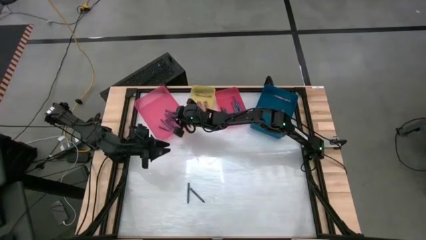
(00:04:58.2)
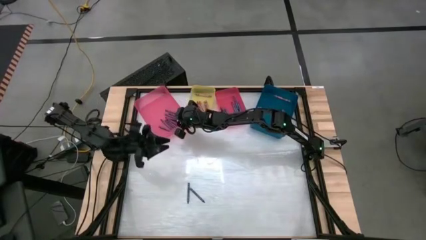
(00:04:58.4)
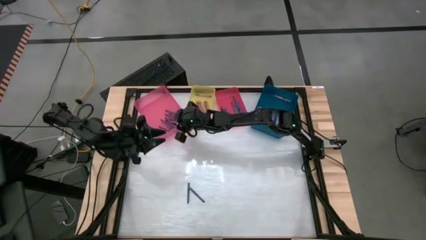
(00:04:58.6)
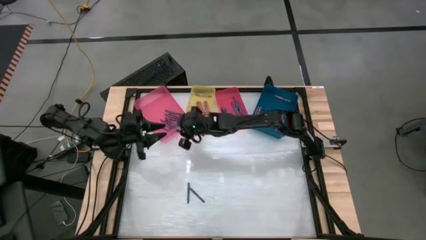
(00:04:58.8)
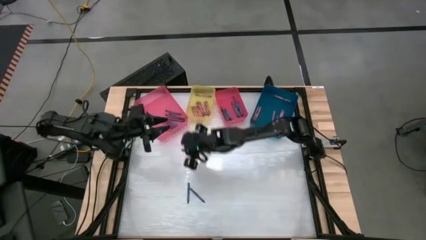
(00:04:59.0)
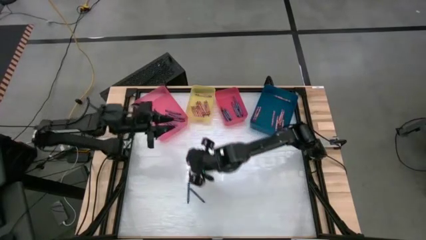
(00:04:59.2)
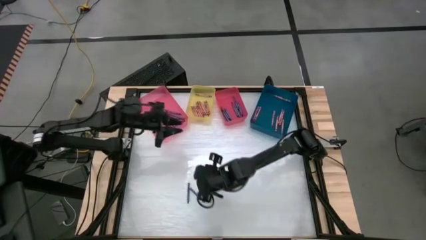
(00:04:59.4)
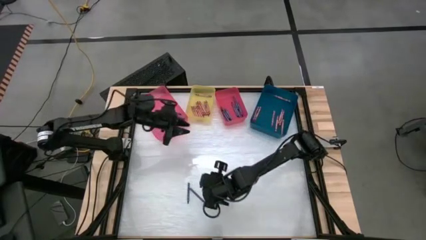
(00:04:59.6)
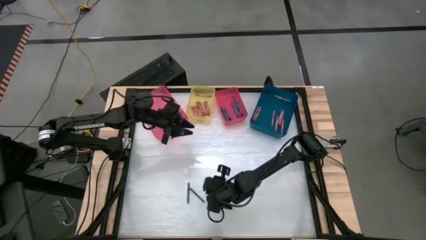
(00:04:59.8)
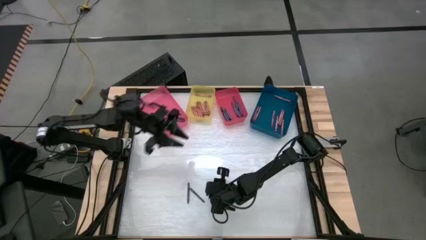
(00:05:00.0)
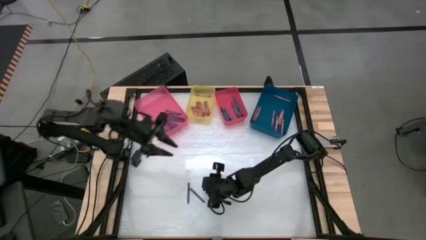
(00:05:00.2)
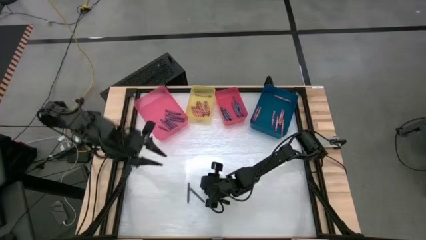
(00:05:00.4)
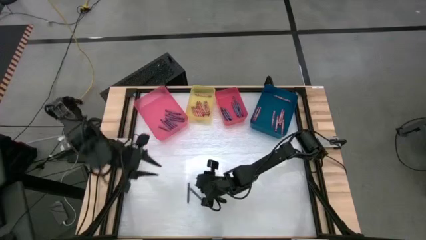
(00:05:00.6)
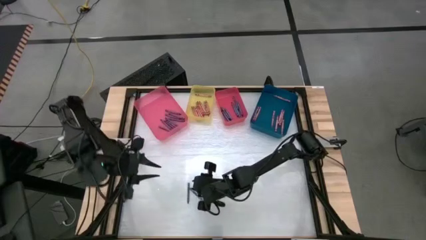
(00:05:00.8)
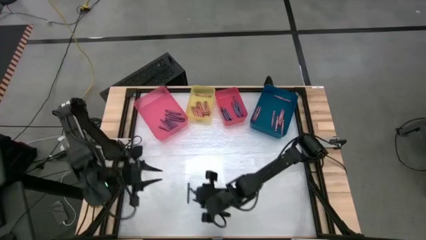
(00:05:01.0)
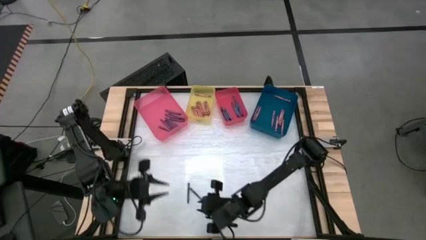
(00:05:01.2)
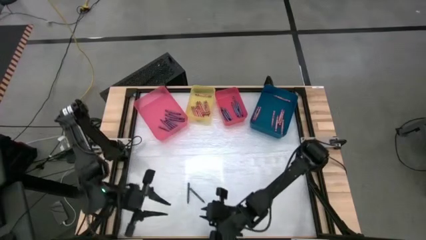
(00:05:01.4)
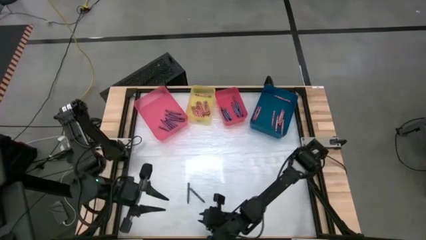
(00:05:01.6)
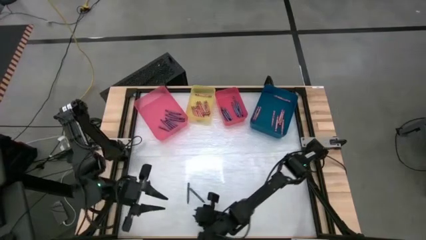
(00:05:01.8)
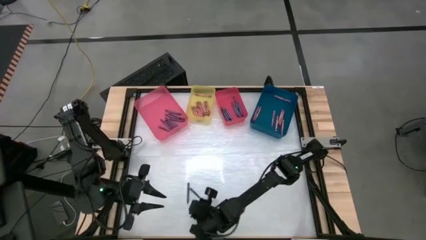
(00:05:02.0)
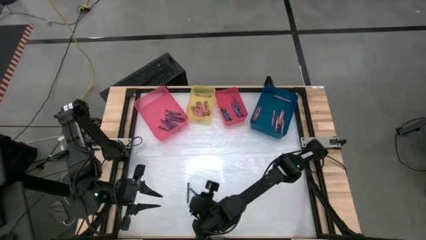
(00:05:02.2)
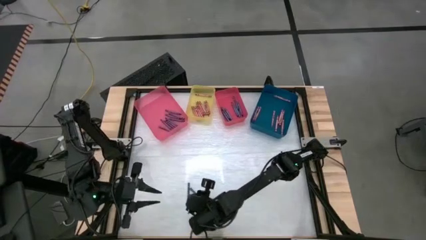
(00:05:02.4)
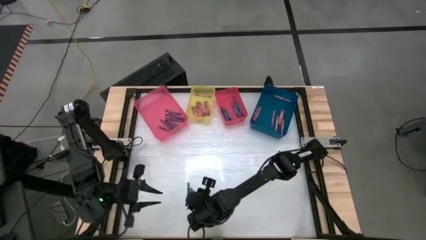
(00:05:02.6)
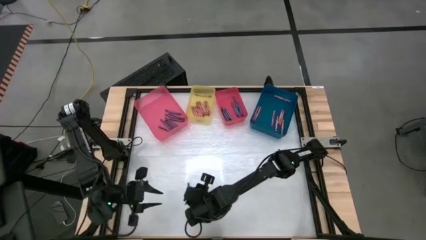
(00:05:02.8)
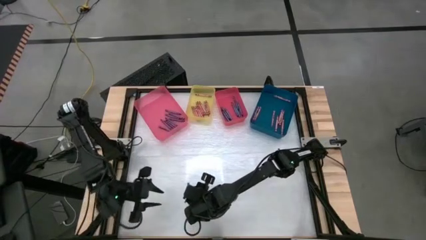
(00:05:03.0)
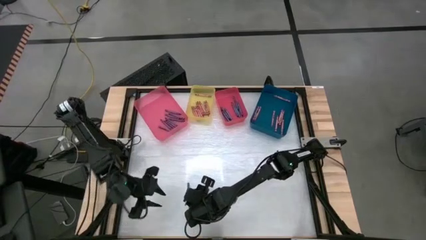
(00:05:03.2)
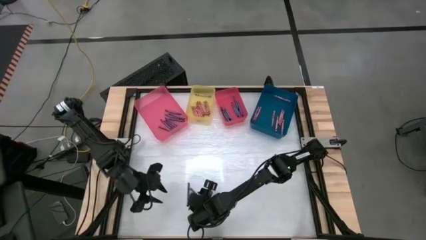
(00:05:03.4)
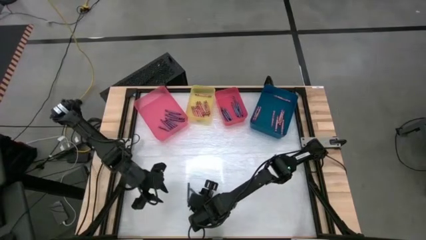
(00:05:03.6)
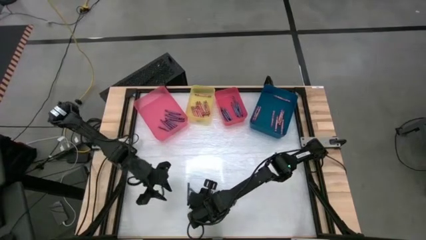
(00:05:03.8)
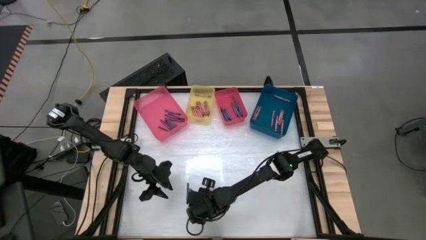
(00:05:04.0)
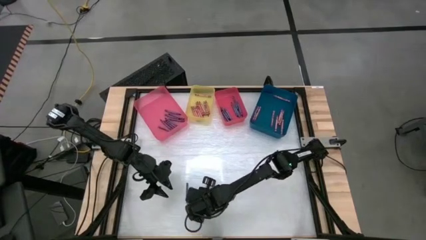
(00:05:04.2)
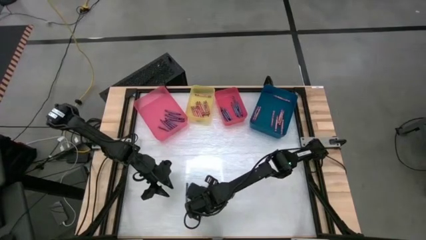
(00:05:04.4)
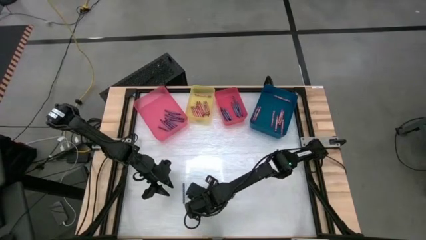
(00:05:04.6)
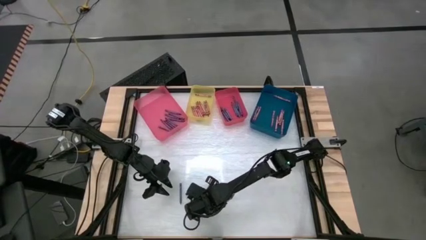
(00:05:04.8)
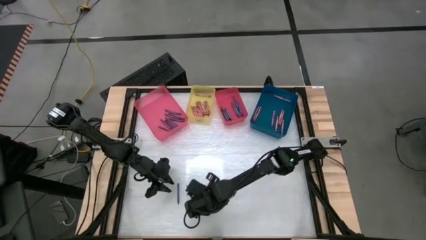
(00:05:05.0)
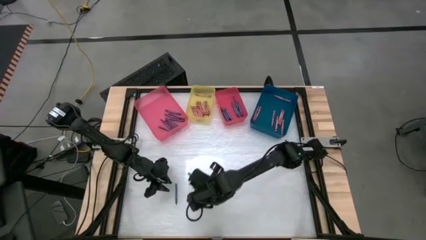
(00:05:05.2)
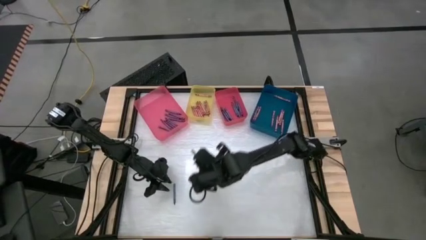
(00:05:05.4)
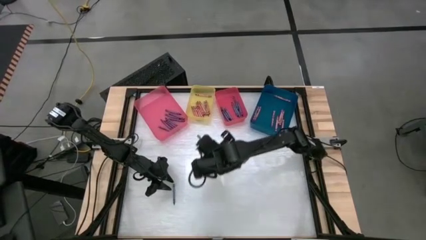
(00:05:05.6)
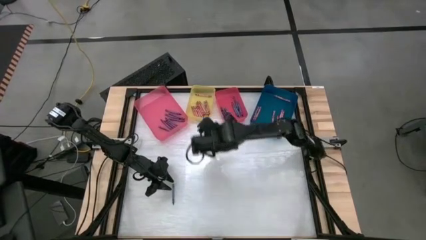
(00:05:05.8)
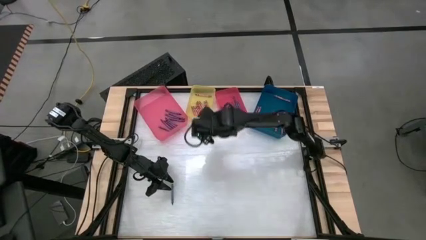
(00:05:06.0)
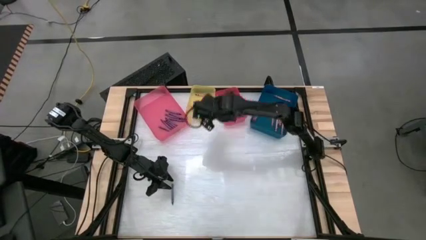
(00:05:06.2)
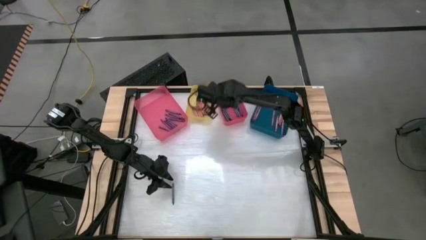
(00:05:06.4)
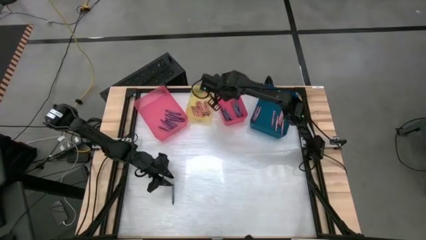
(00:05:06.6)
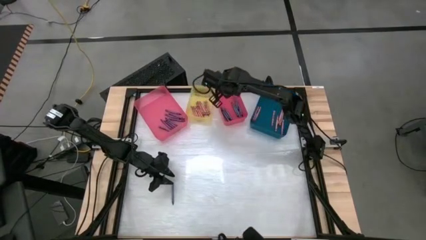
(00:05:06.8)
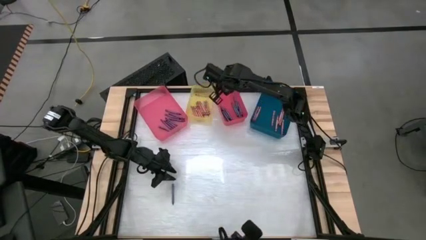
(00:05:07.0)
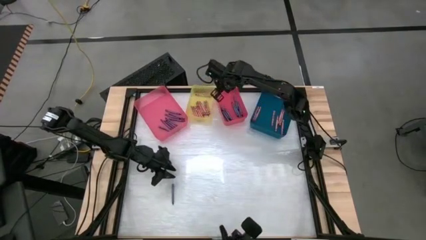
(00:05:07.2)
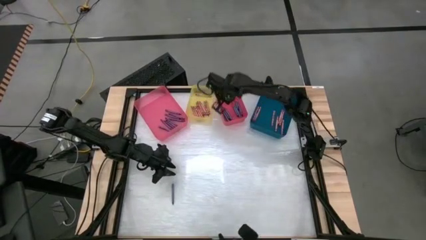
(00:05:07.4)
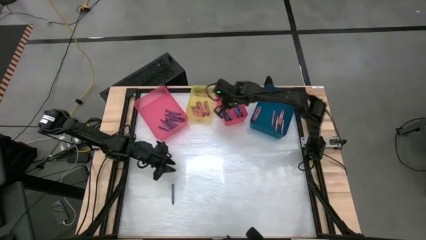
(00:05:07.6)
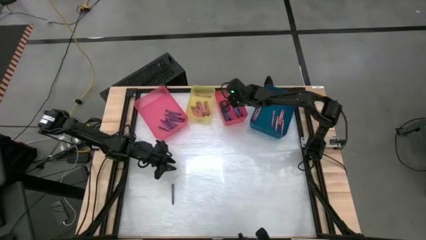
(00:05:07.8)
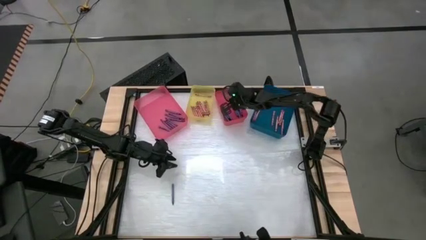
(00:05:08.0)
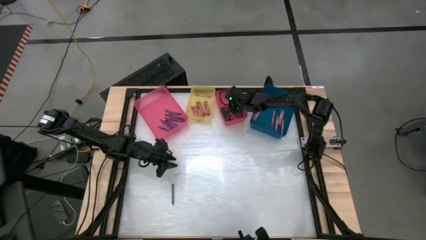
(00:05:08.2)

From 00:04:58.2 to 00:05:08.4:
Task: Sort crayons
Put the blue crayon into the red bin

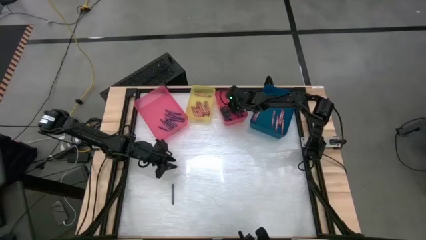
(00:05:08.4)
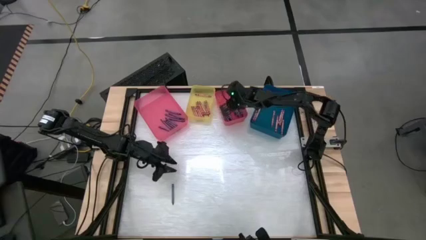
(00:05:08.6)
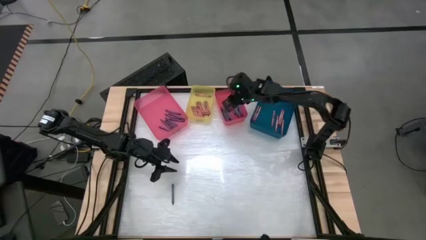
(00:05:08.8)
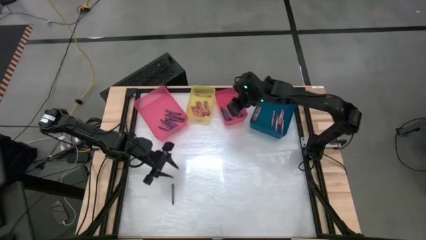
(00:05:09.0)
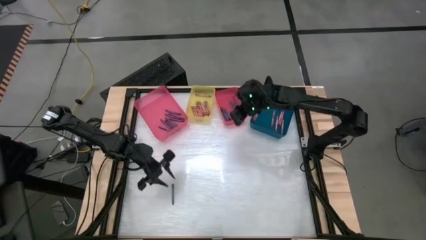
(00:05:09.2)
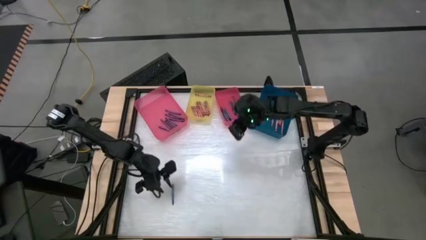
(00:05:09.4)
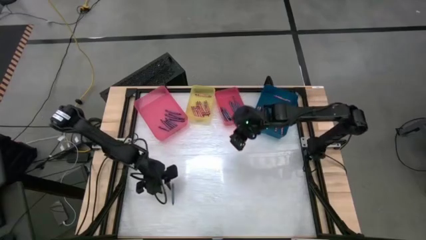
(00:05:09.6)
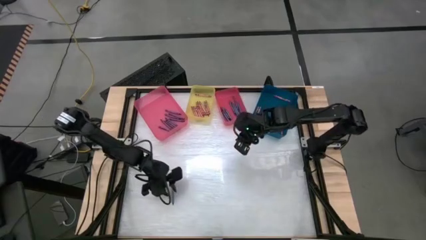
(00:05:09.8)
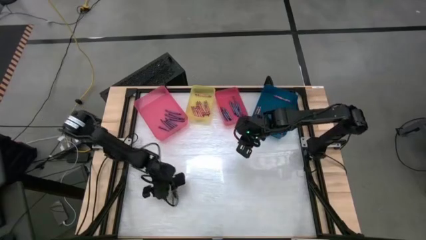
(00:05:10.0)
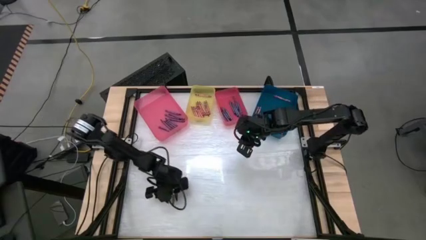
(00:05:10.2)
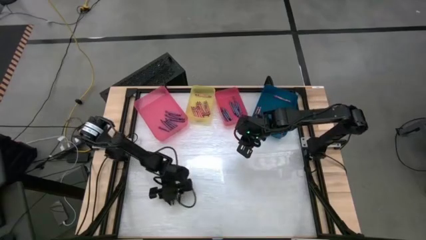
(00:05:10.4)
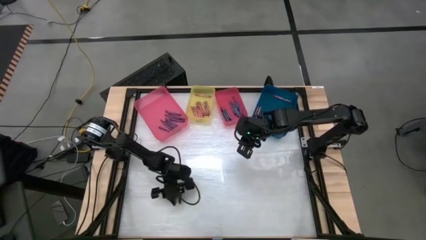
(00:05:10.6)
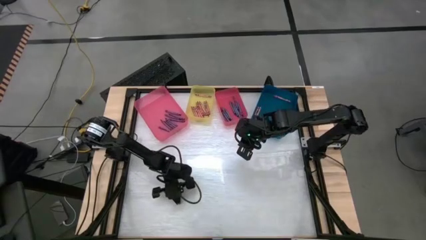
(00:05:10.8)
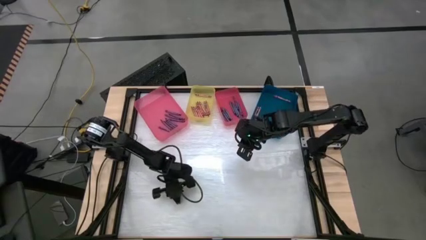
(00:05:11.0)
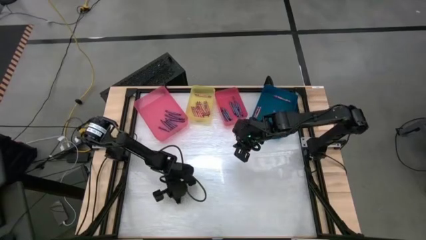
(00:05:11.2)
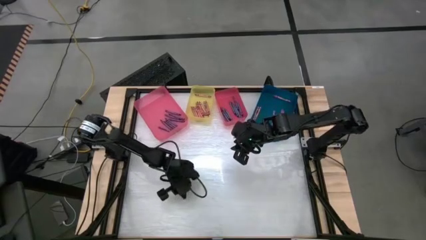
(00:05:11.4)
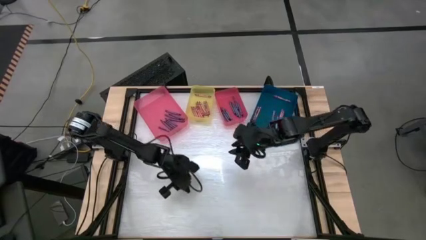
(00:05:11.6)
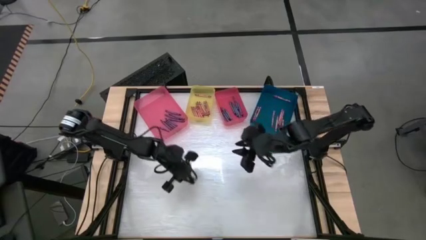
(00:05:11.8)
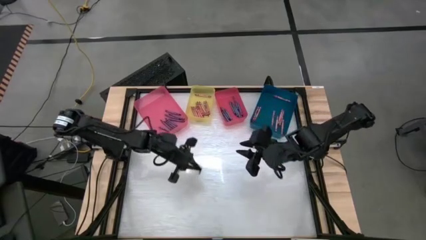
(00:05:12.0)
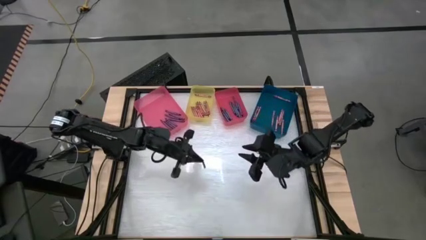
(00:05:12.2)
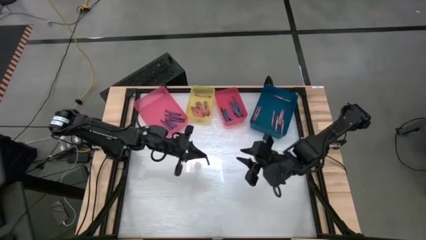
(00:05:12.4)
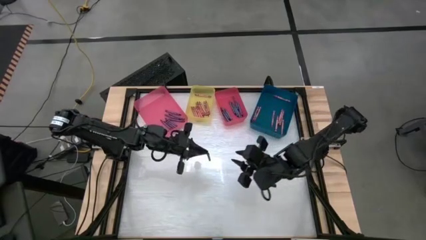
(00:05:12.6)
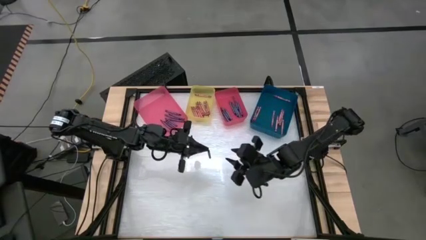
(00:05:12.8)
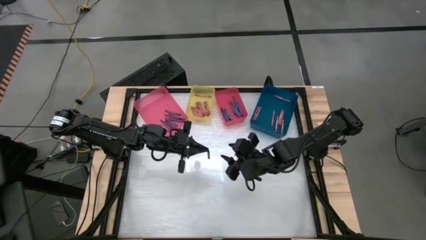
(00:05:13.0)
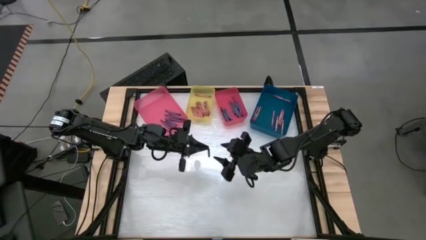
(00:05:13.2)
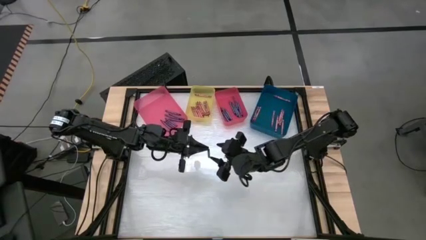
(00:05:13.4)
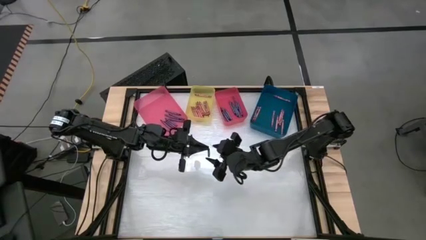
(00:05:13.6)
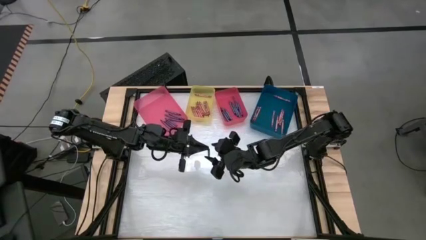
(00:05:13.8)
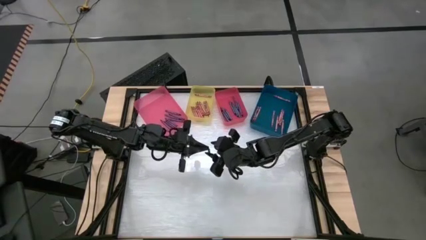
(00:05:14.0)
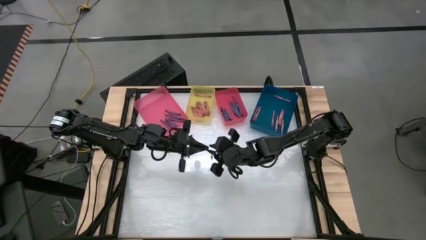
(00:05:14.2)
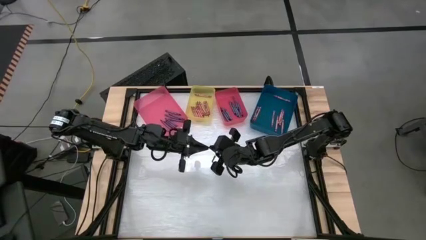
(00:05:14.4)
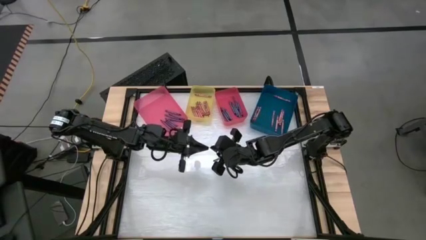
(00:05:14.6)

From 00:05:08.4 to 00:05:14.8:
Put the blue crayon into the red bin
